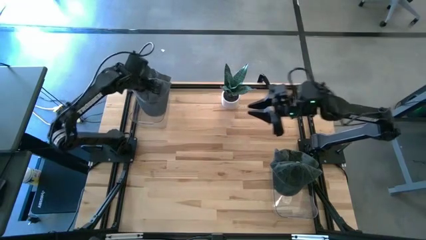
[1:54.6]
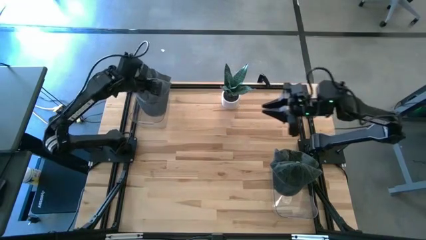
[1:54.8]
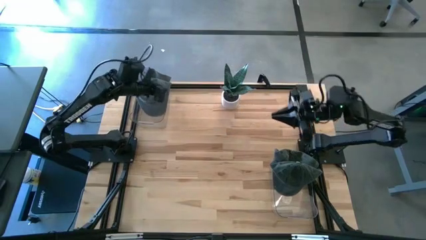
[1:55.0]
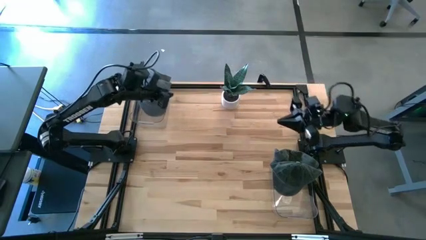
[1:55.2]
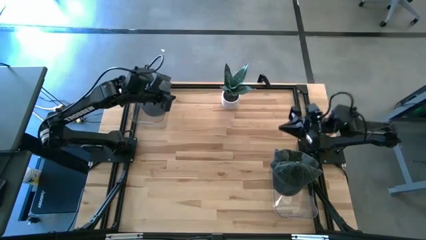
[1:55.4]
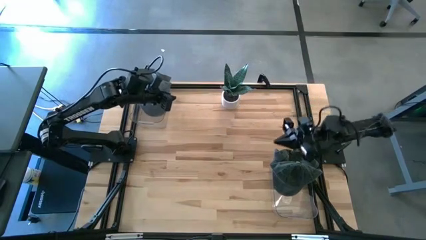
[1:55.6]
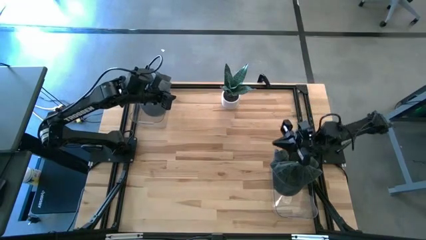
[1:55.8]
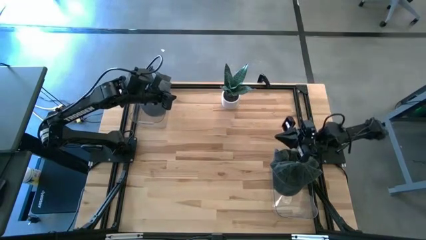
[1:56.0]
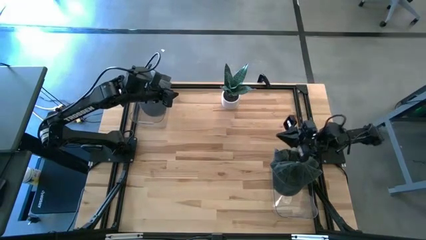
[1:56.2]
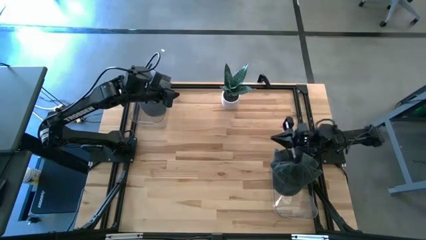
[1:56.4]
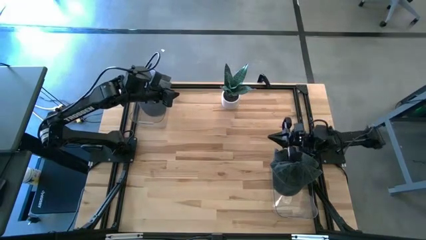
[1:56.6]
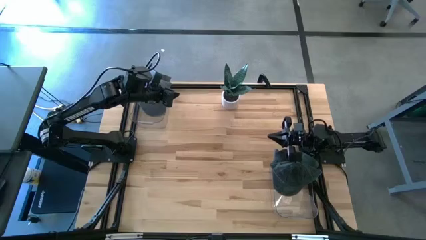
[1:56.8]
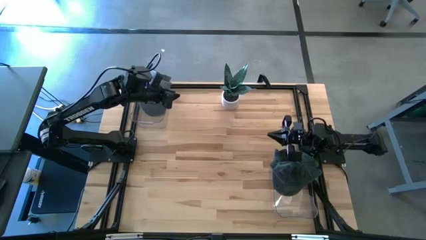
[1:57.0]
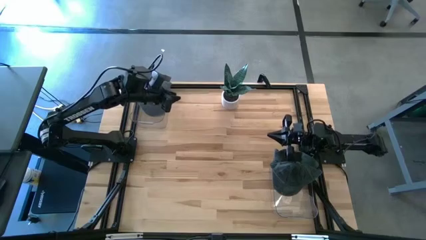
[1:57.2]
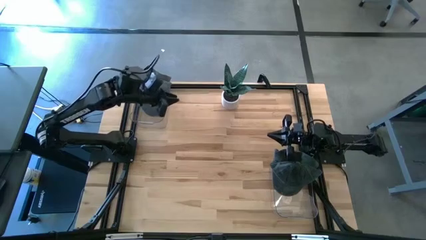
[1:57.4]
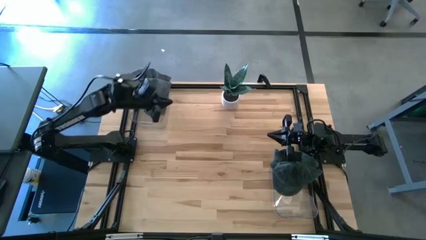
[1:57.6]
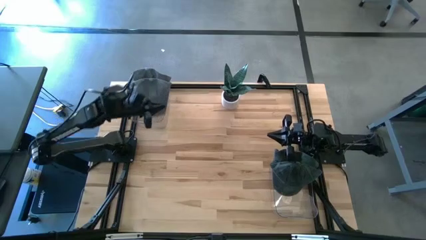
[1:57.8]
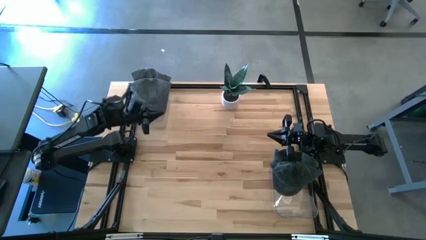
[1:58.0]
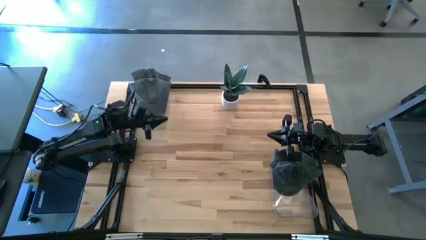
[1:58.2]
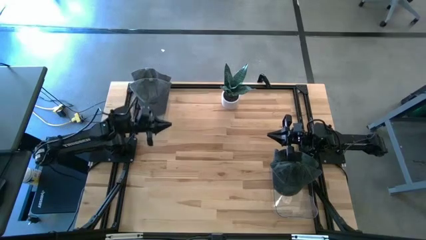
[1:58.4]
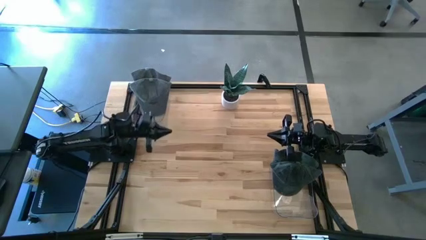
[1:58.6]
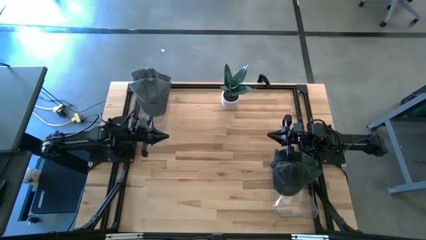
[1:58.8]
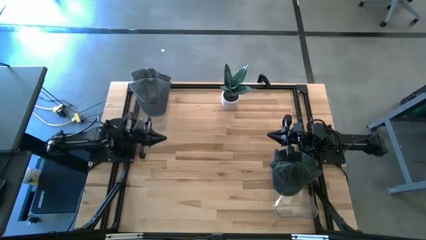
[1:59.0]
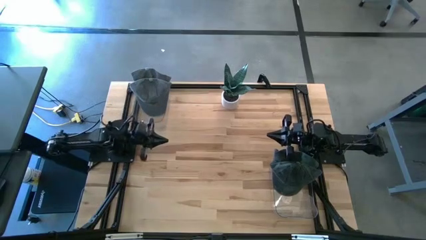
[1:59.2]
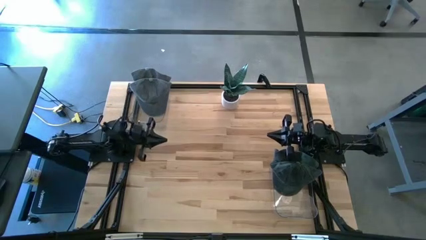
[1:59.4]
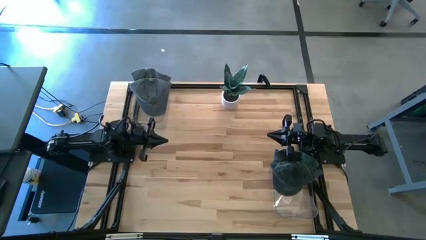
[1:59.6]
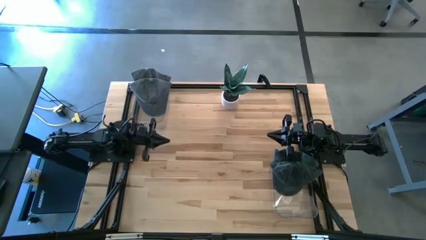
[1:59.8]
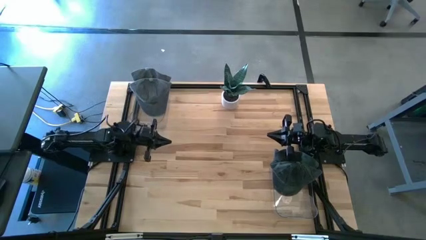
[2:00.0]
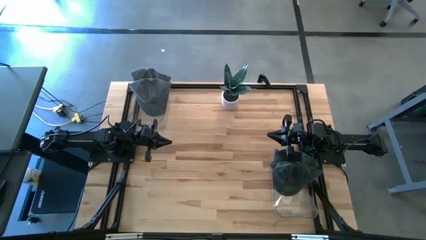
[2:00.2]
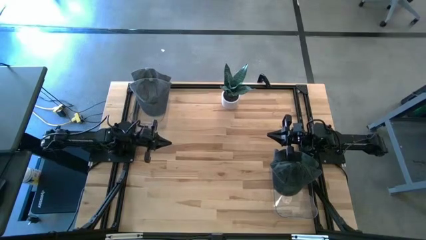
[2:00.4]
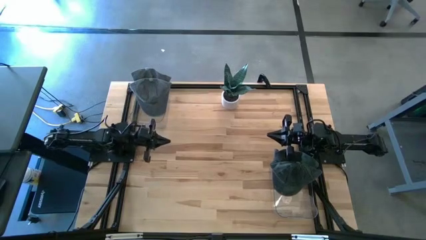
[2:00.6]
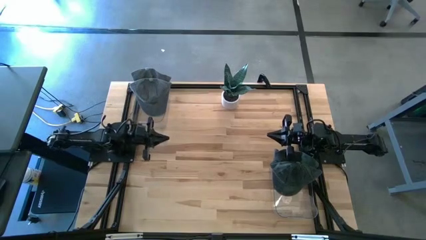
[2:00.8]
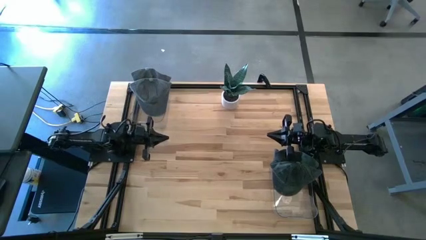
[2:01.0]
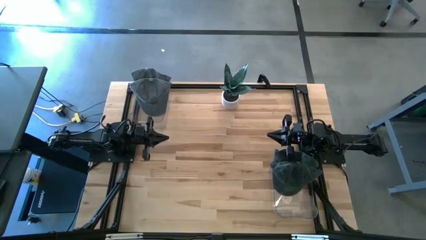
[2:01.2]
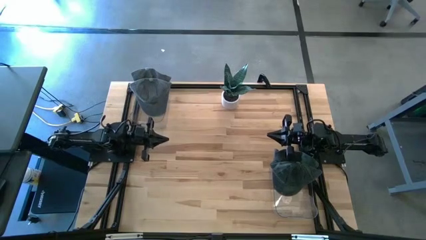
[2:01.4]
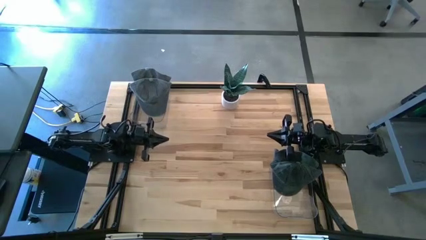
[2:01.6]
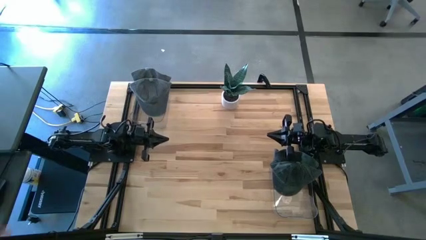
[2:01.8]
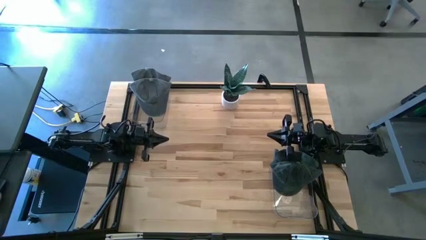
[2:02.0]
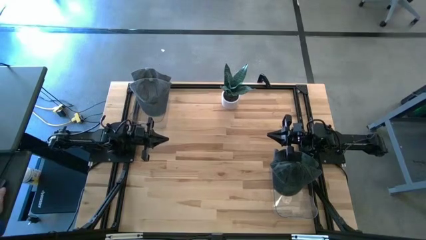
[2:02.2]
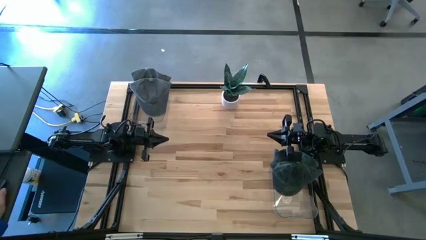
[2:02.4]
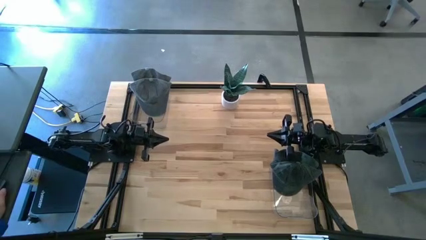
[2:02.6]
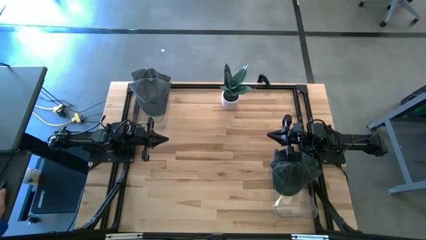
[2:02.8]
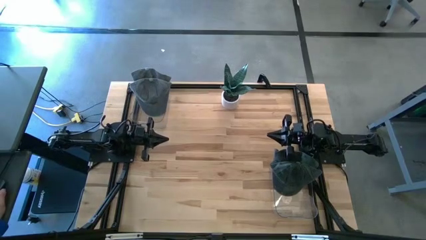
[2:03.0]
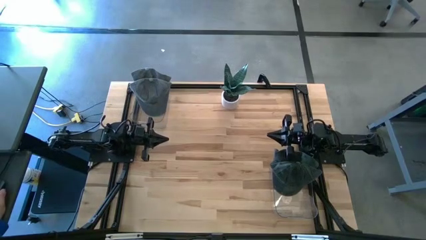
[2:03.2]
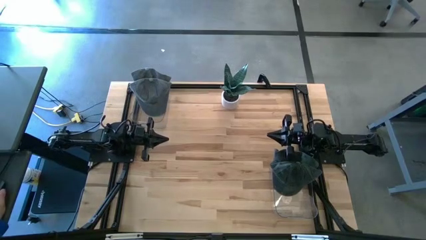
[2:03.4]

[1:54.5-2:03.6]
Task: Pick & Place hat
Return to Home Position

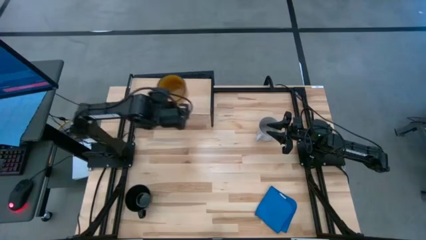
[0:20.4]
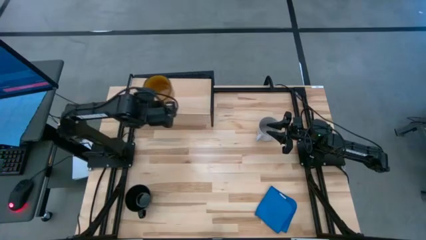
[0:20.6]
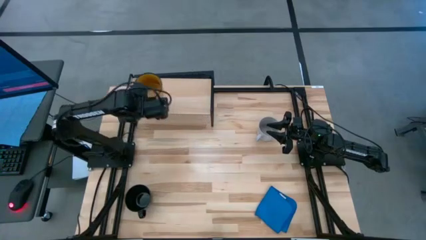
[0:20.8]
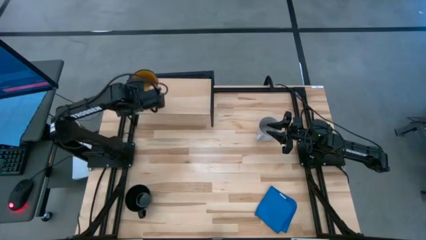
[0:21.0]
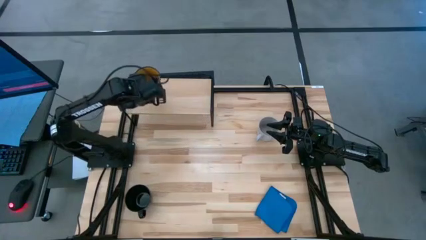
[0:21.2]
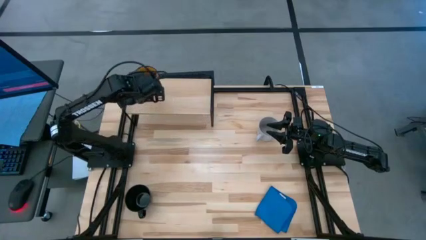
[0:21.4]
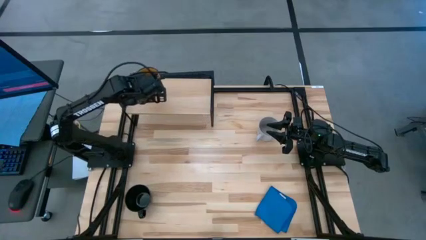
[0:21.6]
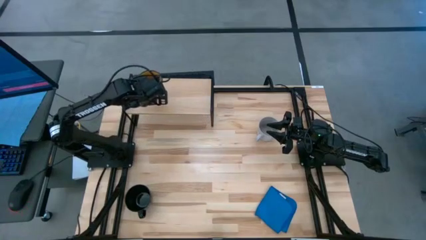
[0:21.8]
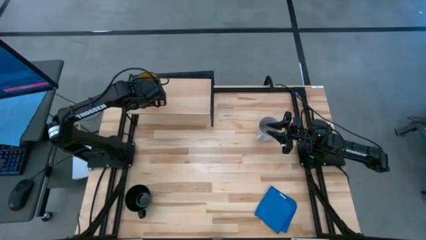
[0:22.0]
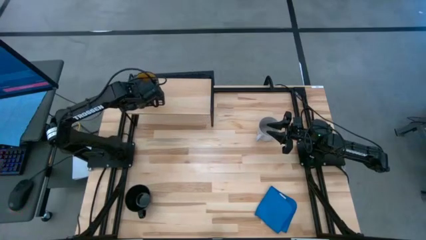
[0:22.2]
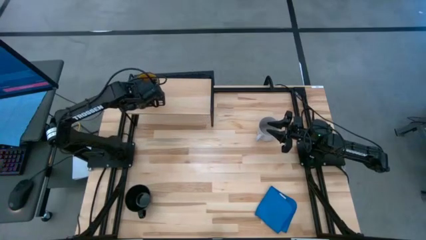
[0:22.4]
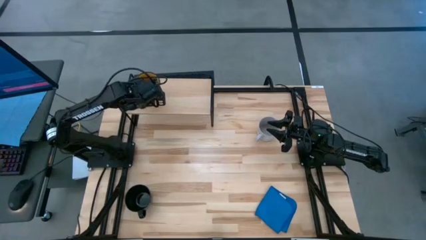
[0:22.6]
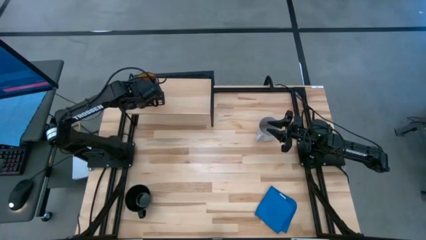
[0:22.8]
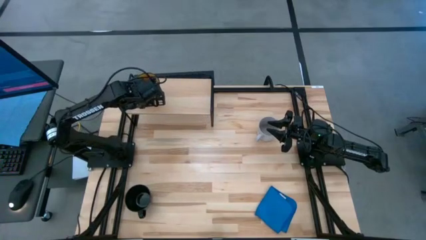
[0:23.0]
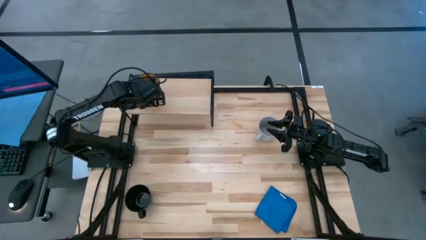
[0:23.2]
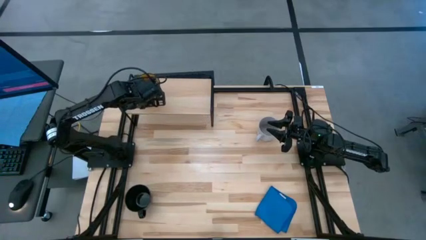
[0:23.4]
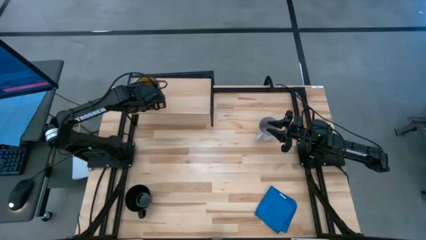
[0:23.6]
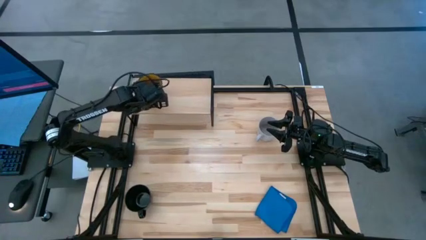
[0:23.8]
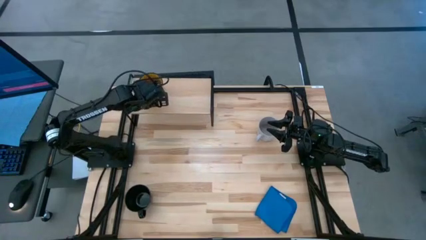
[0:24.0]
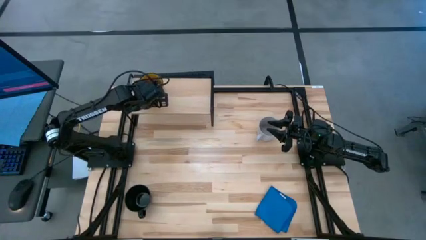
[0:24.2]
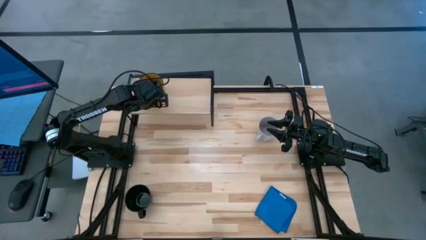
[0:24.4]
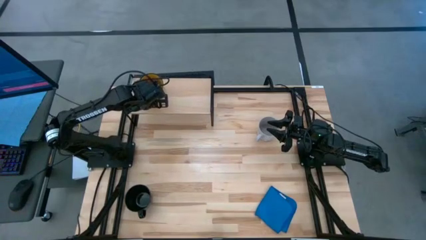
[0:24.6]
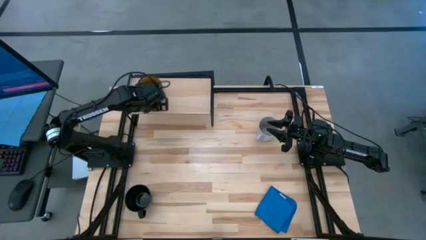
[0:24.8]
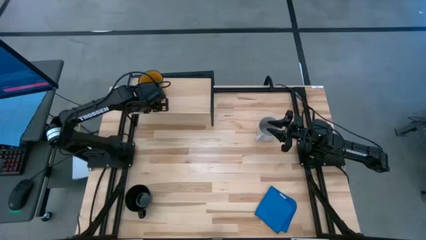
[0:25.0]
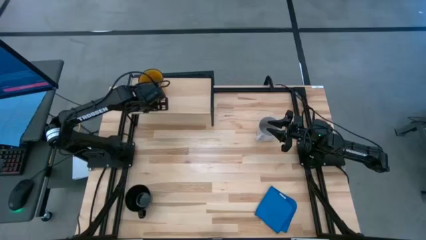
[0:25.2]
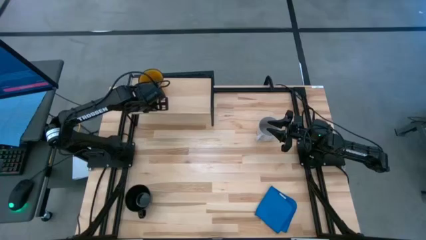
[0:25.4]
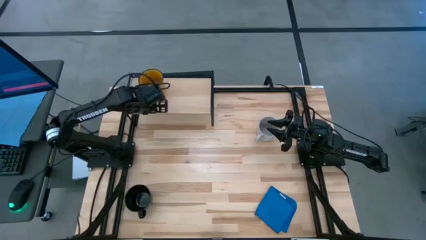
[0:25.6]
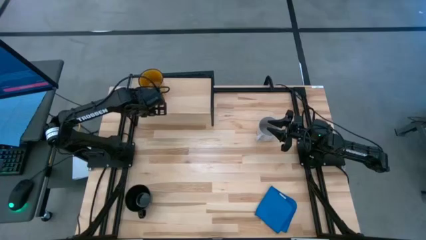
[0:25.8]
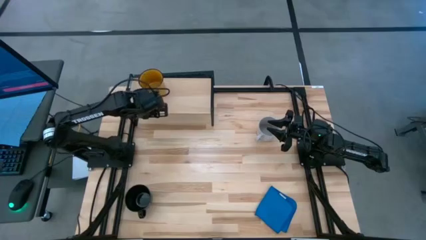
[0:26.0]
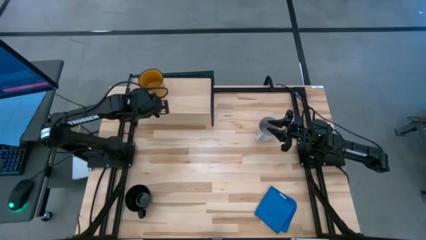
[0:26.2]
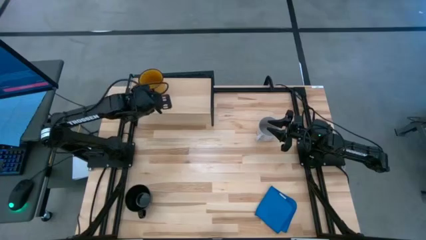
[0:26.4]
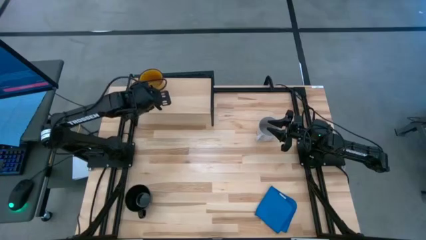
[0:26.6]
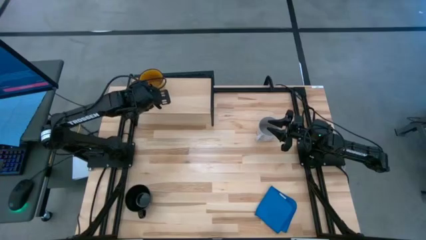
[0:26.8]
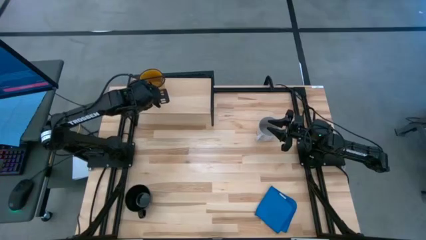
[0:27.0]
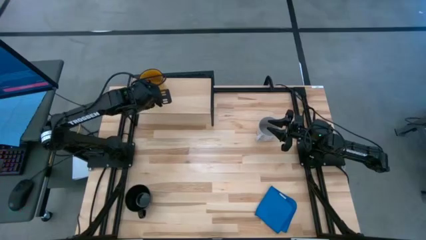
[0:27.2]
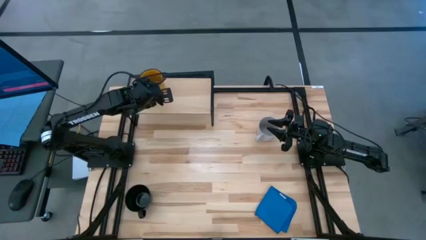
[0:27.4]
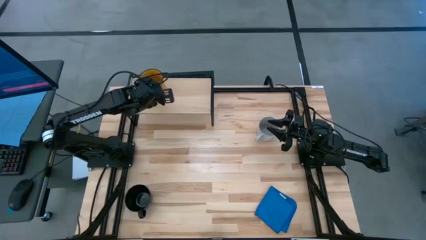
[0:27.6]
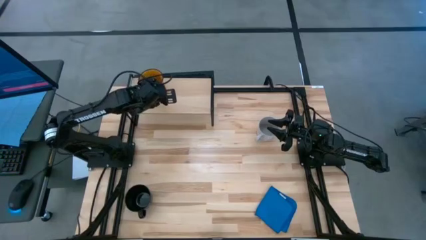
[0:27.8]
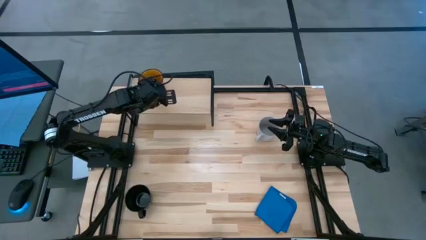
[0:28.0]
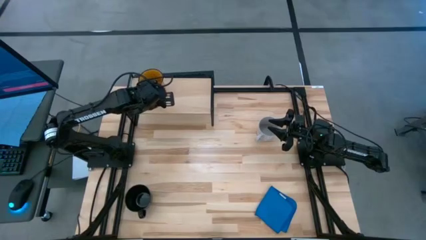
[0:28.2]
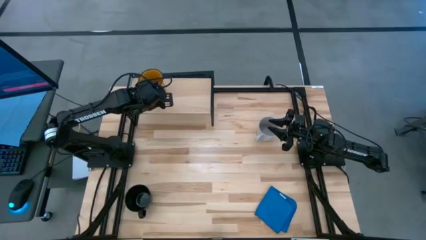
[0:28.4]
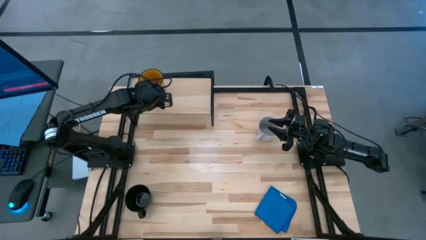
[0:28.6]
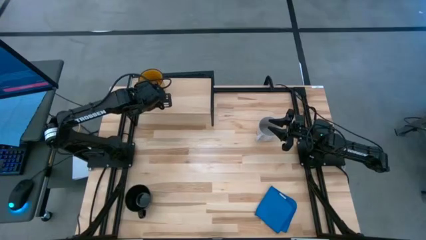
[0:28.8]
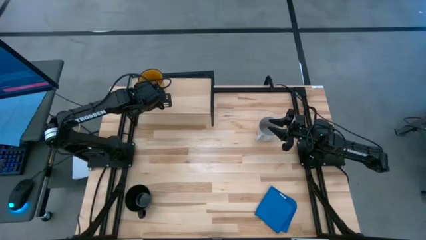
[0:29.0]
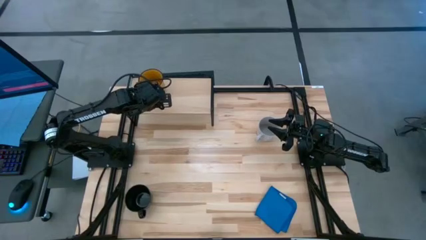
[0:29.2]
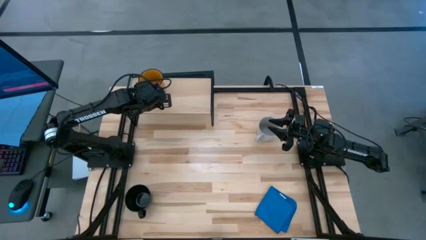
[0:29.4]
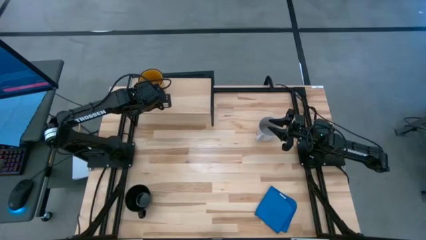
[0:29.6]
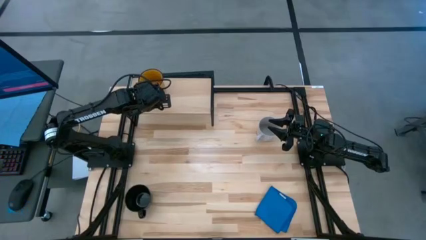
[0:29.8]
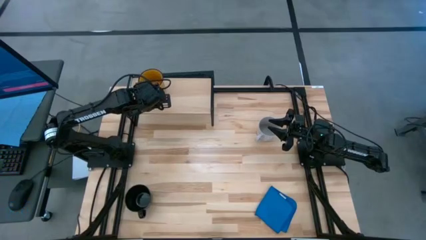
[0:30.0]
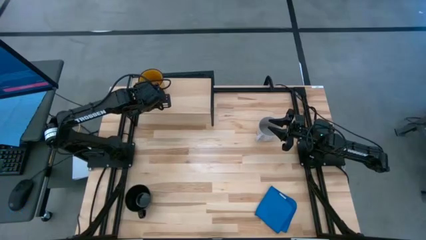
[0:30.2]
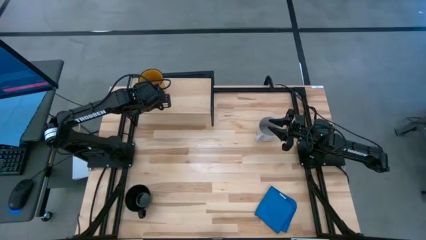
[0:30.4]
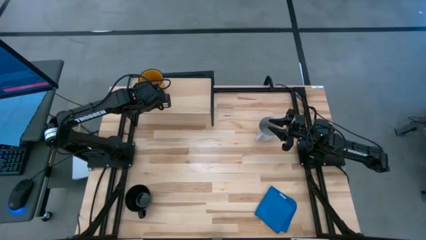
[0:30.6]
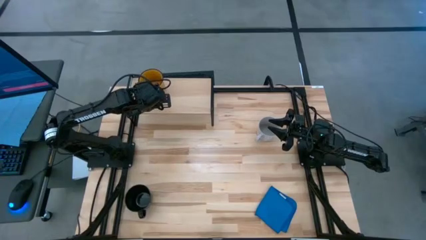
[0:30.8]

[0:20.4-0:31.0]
Task: Stack small to large cups/mugs on shelf
Put the yellow mug on the shelf
